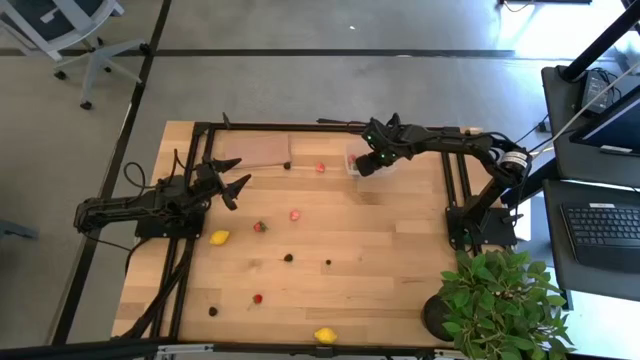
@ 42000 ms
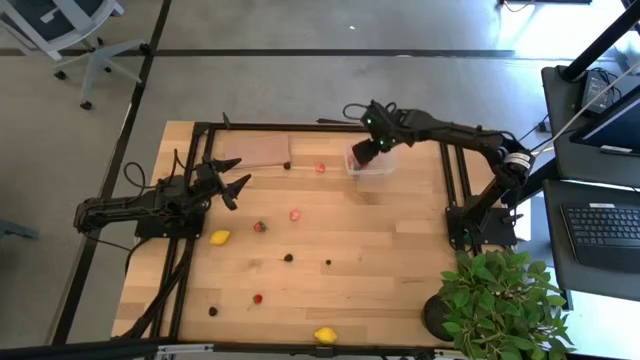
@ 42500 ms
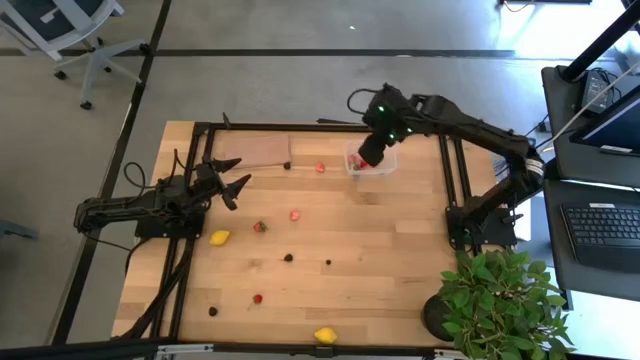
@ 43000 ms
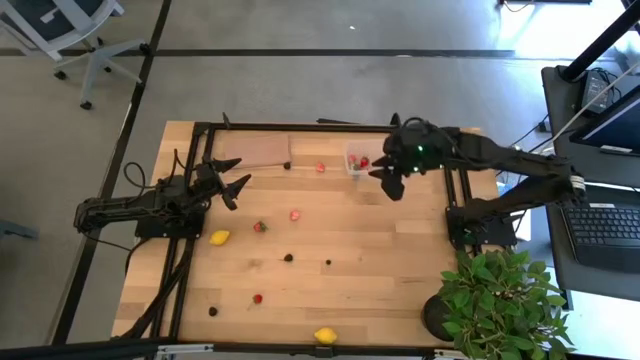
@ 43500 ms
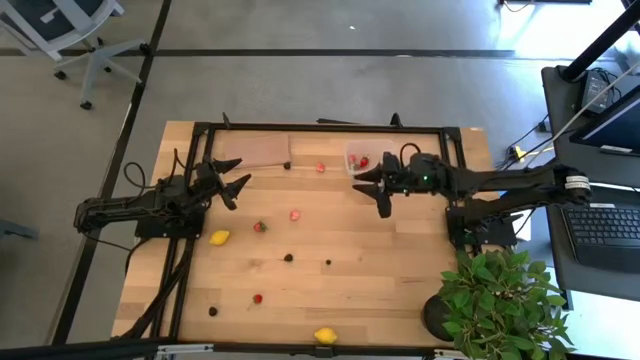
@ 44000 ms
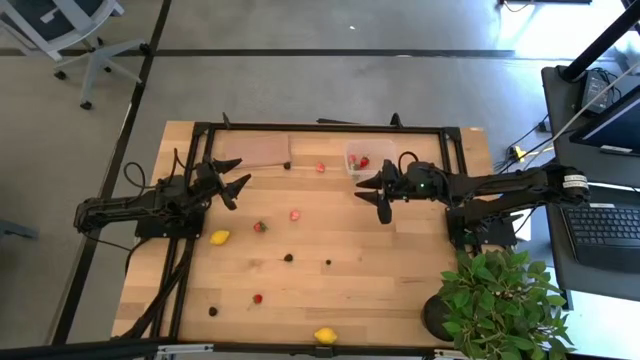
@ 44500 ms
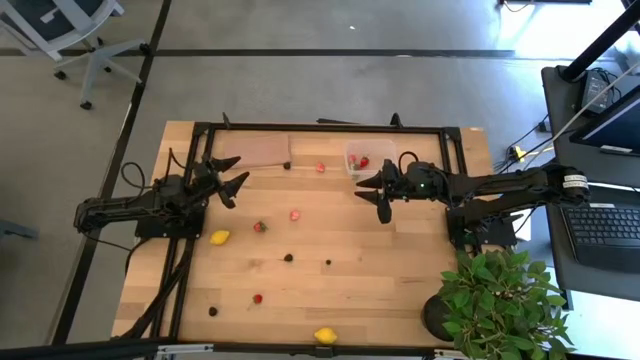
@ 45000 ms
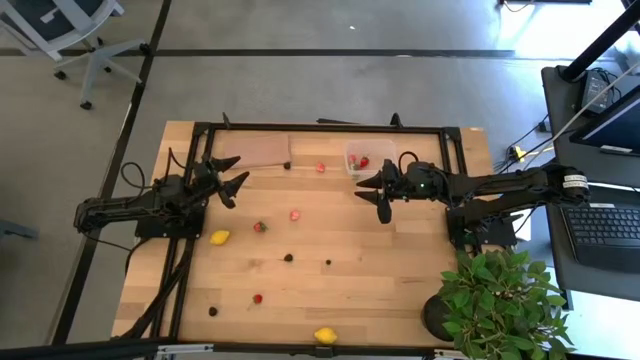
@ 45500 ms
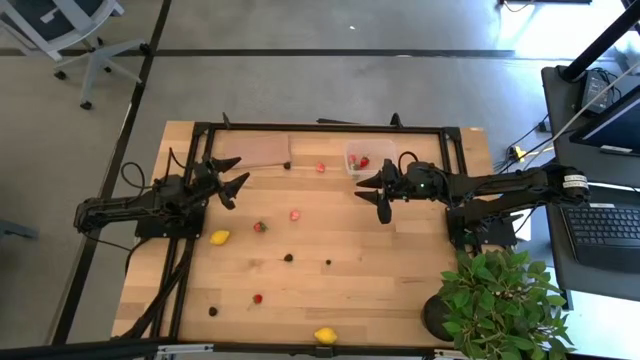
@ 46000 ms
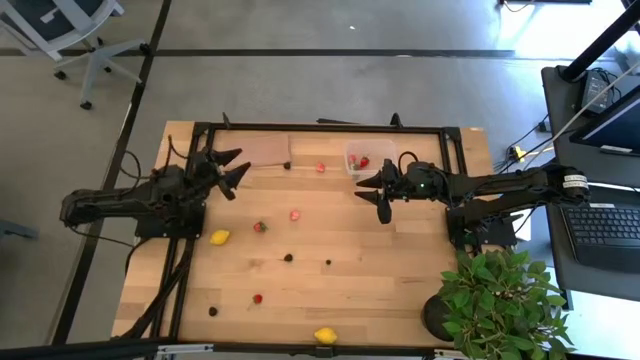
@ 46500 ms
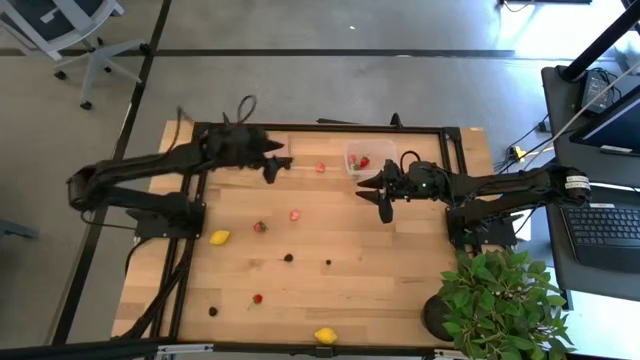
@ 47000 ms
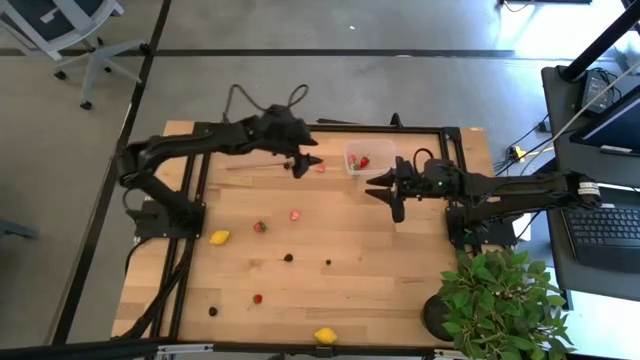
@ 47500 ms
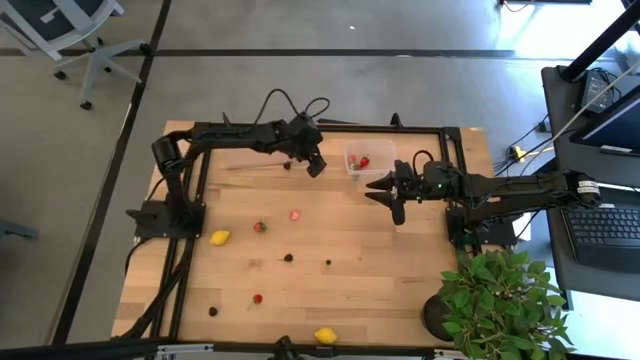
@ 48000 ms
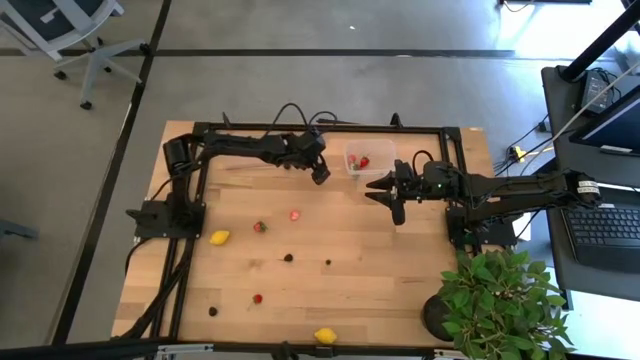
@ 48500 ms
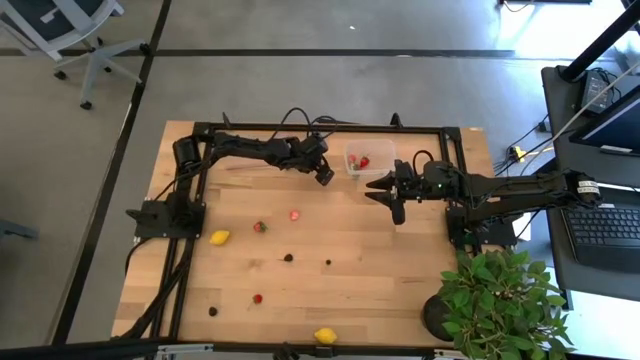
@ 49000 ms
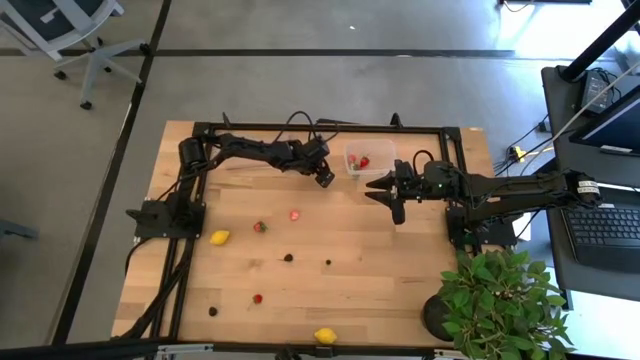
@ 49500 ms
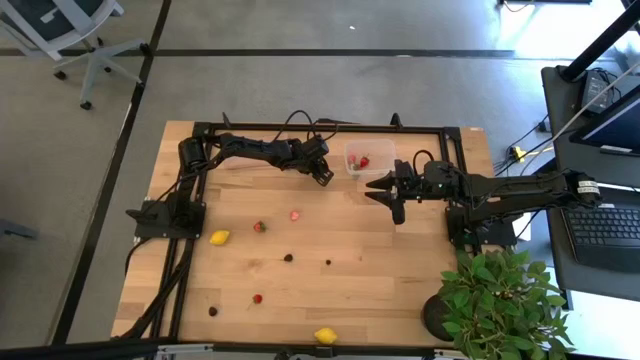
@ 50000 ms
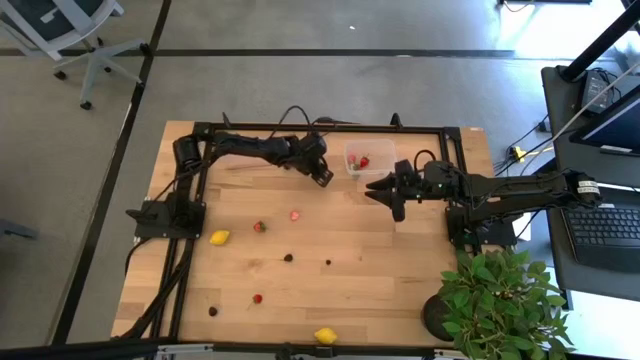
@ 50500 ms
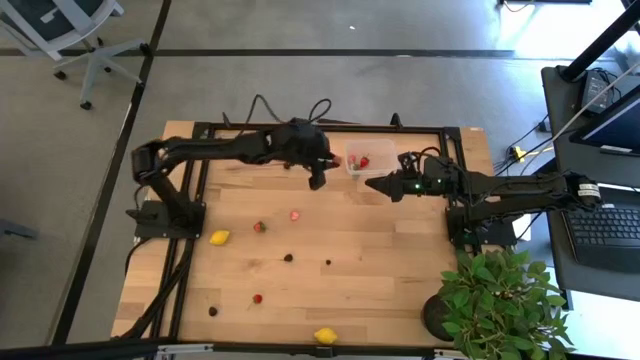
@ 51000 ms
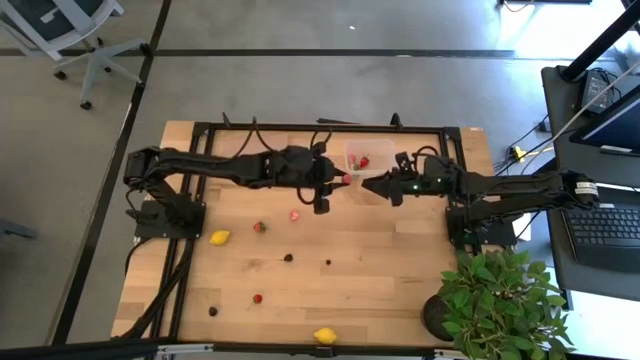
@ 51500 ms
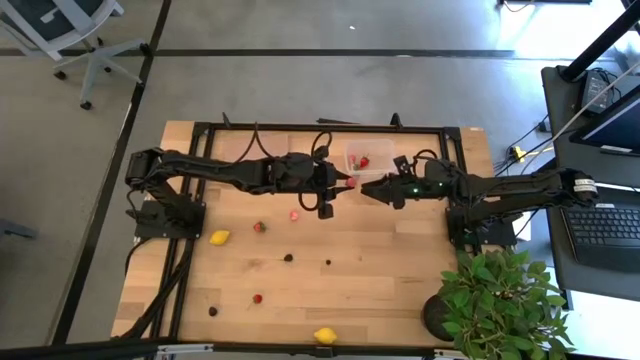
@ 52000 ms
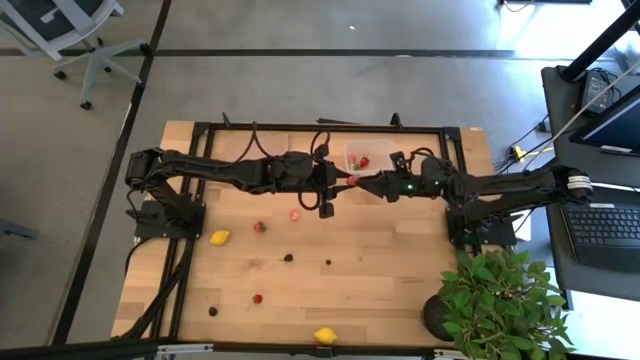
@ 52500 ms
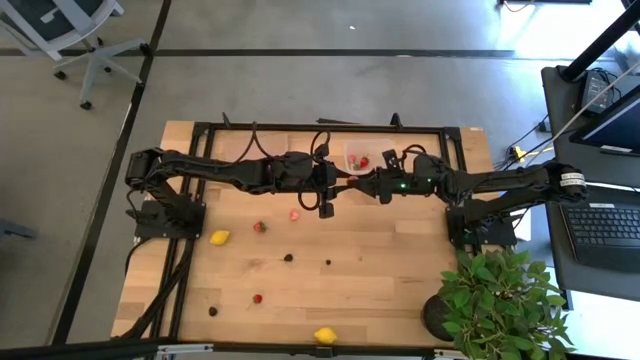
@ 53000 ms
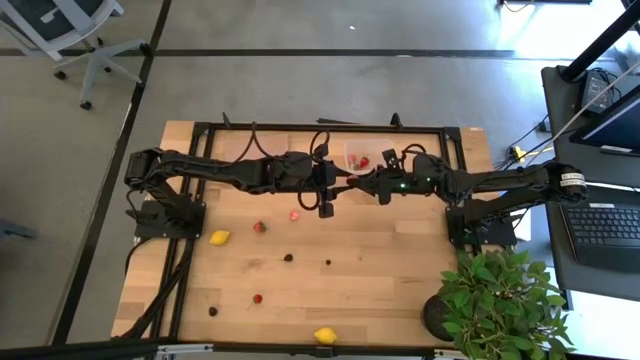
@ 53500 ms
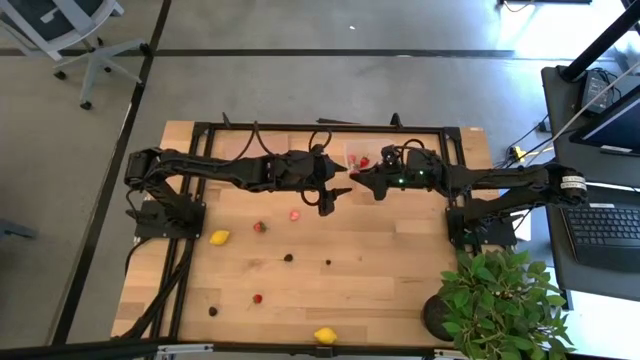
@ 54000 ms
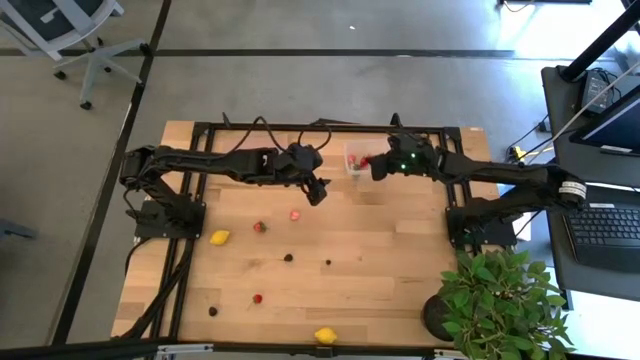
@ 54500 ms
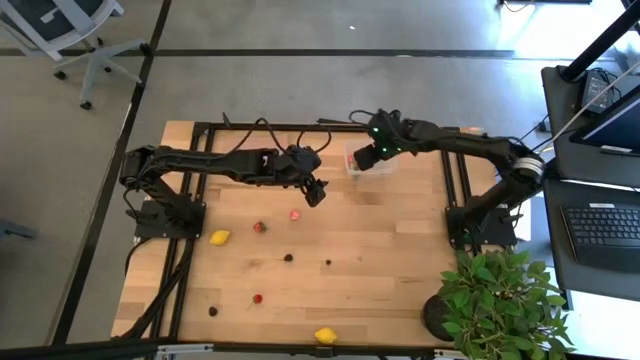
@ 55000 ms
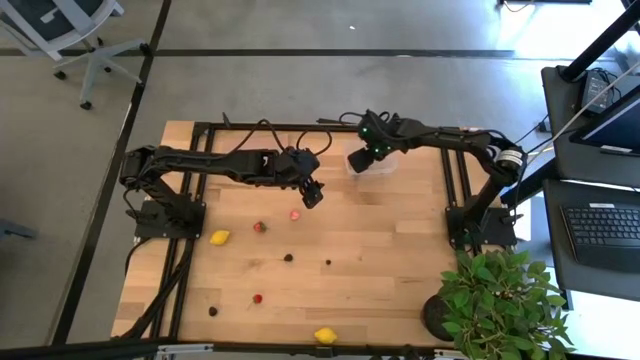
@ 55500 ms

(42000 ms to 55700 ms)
Task: Pick and placing Produce into tupperware
Put the peach into the transparent bin

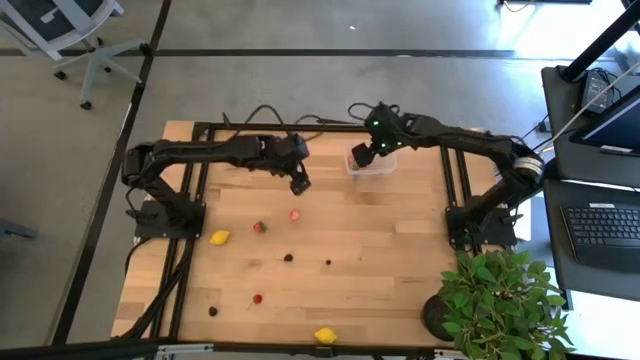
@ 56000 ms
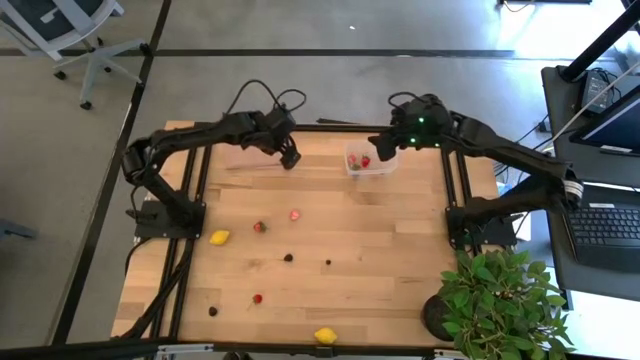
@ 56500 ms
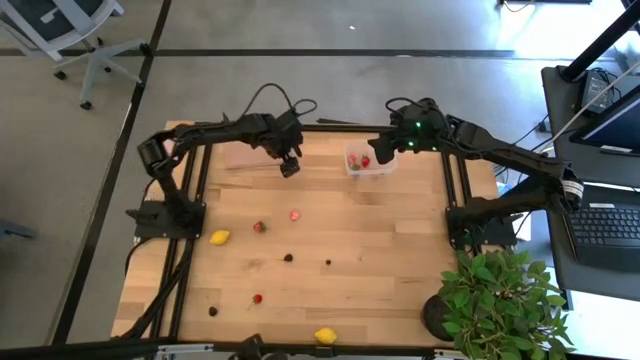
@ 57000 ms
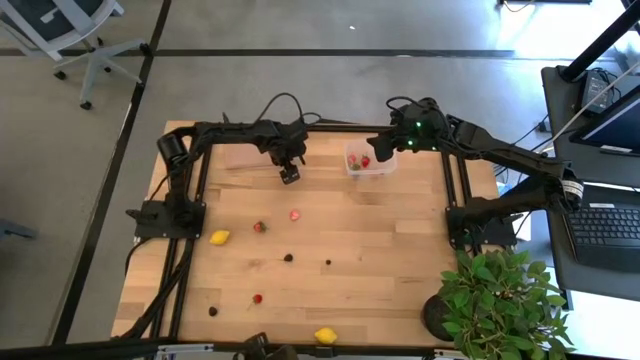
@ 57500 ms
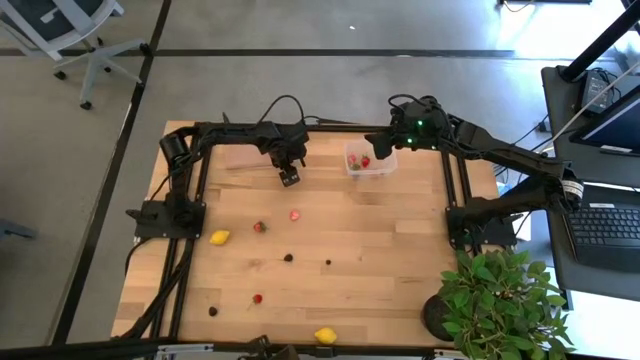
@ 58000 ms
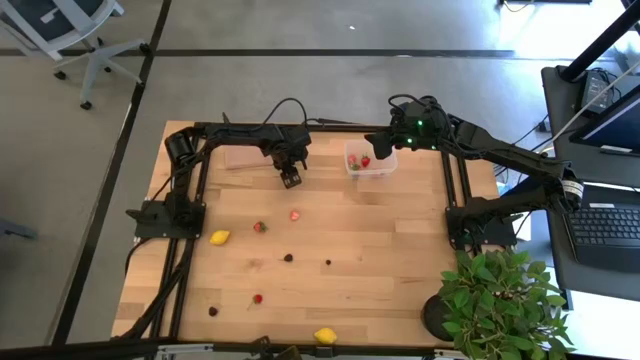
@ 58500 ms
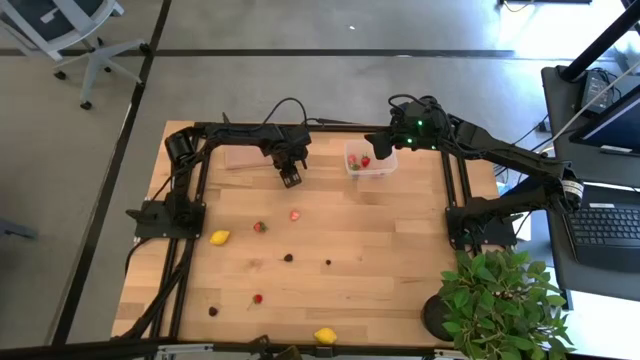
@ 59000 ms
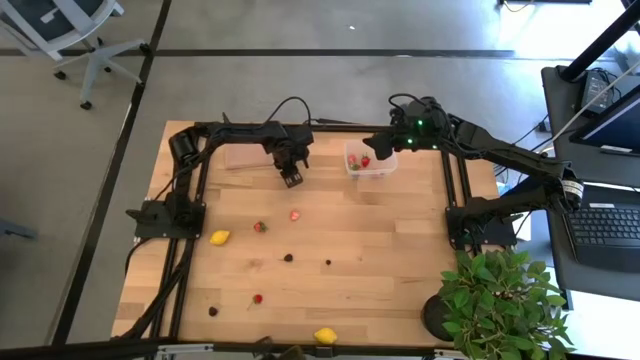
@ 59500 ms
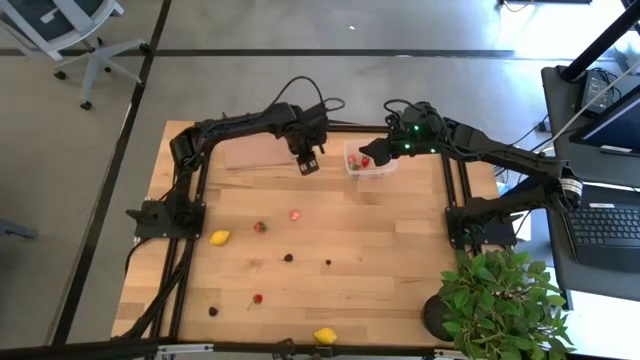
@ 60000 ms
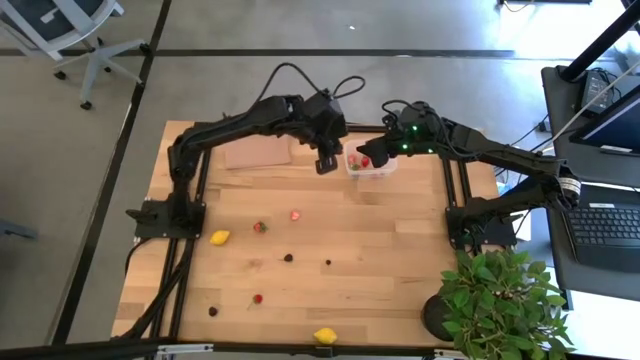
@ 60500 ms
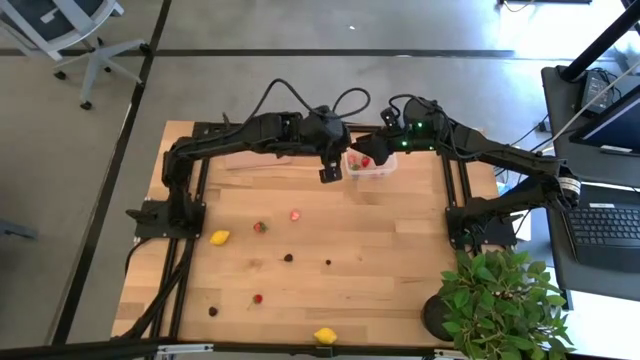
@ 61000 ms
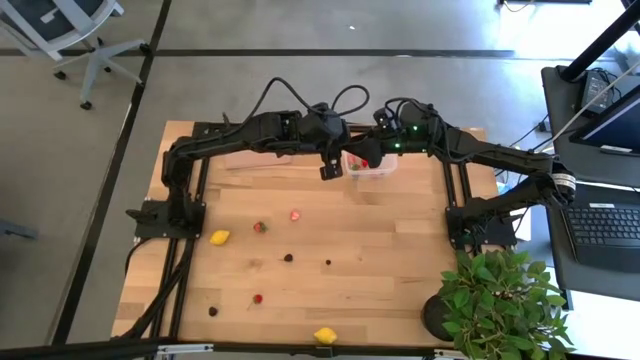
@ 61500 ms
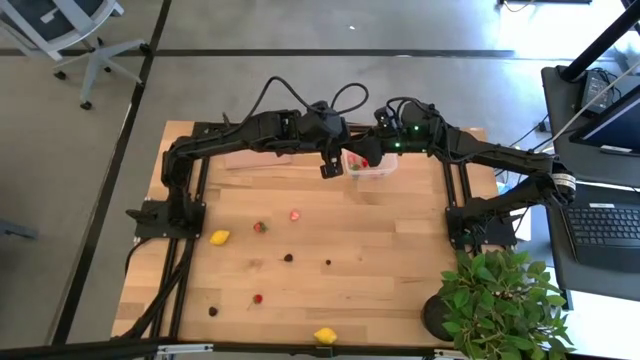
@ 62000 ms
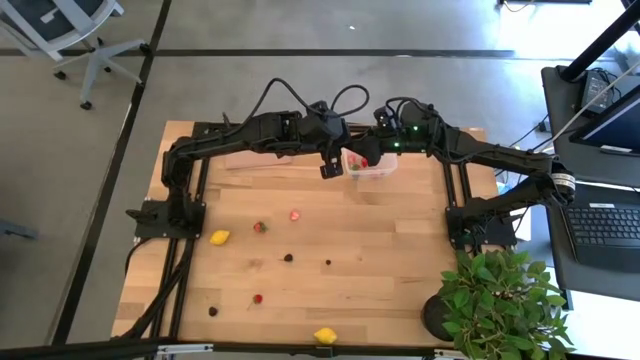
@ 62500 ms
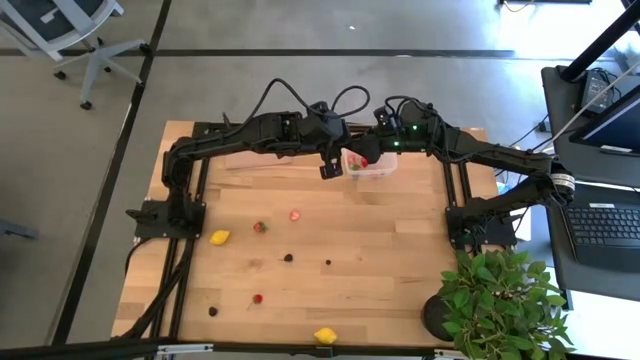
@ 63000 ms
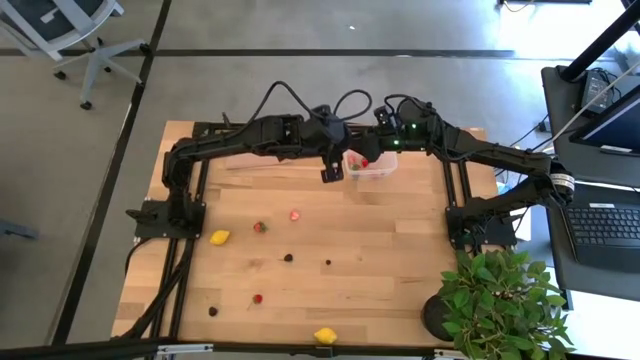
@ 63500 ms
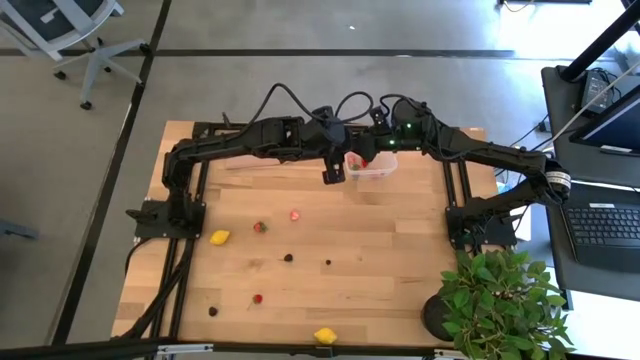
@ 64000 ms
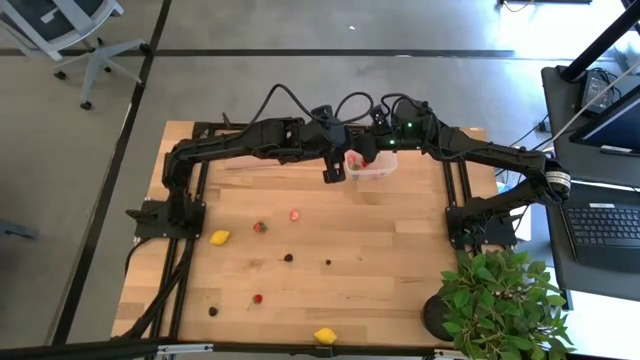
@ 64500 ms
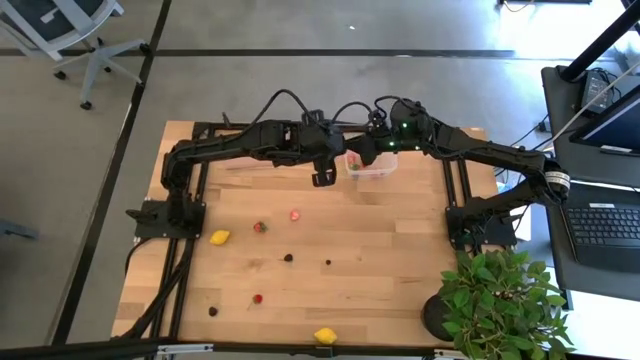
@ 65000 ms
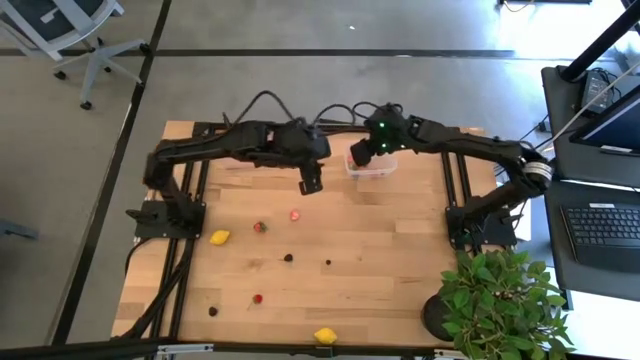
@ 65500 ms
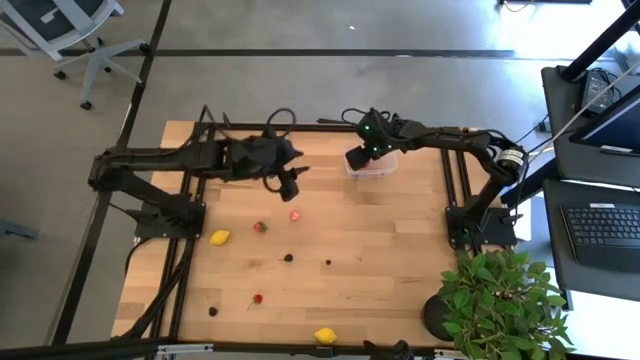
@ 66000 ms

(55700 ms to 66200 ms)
Put the black cherry into the transparent bin
